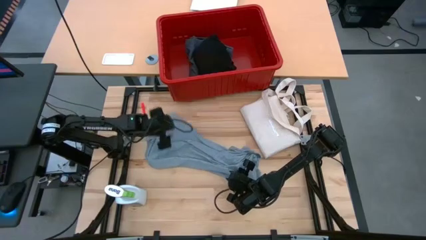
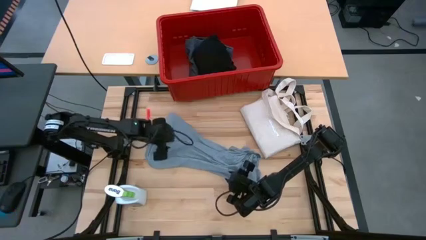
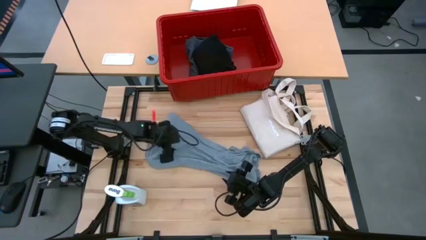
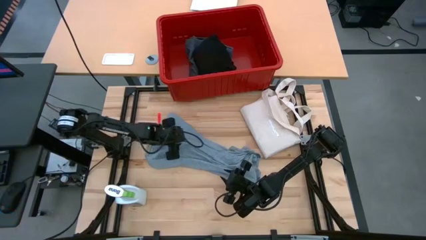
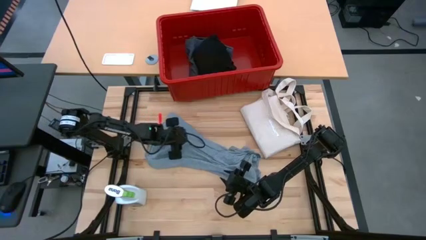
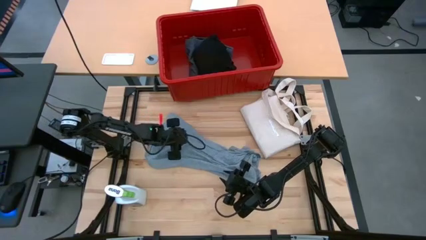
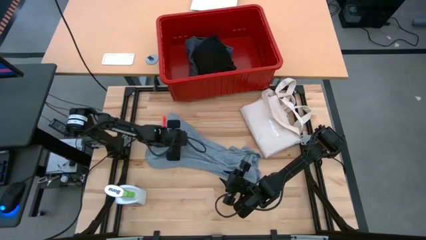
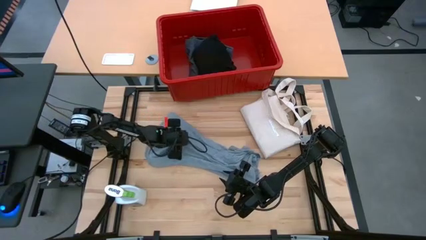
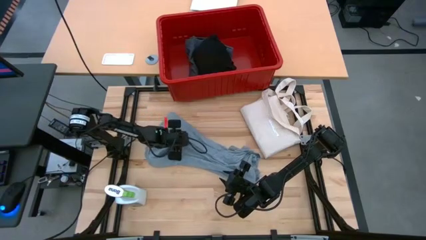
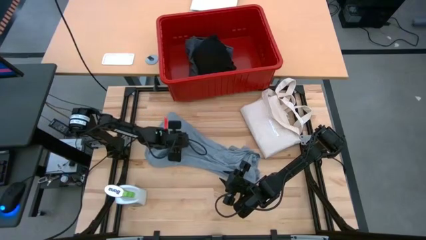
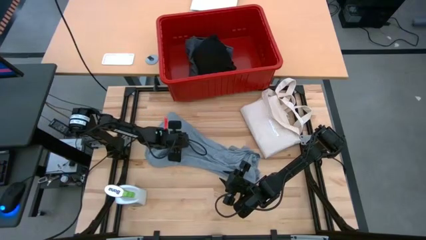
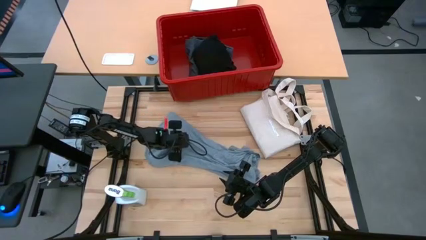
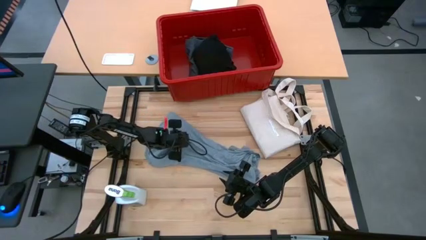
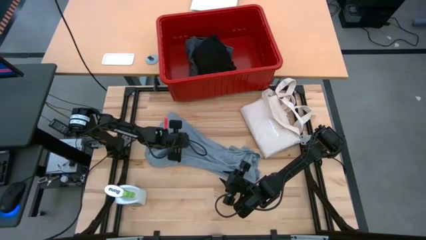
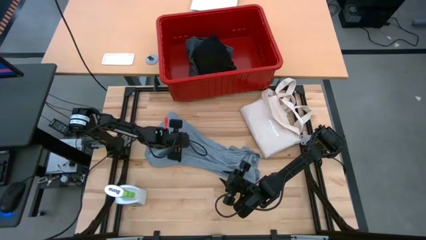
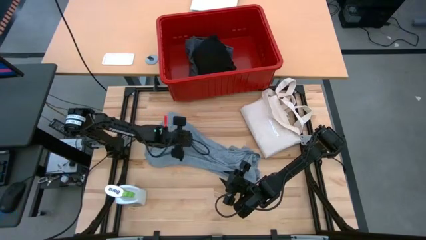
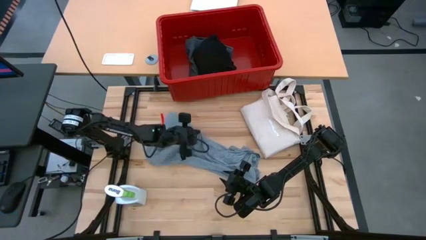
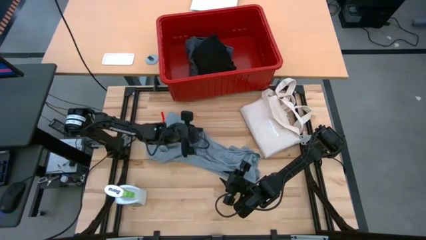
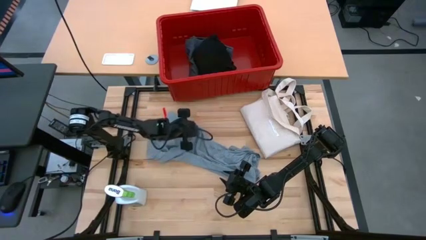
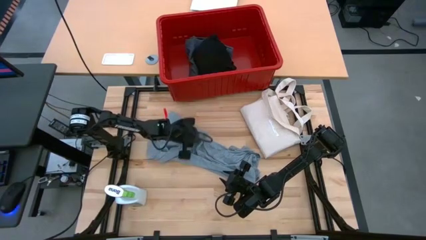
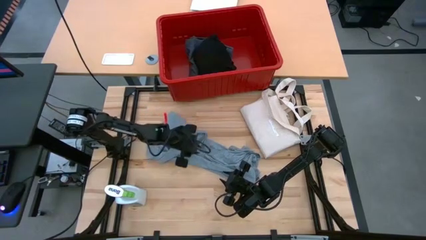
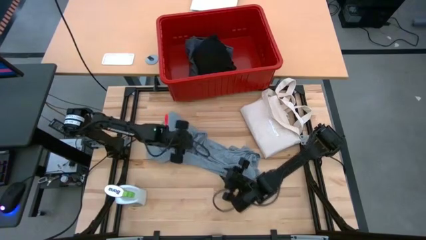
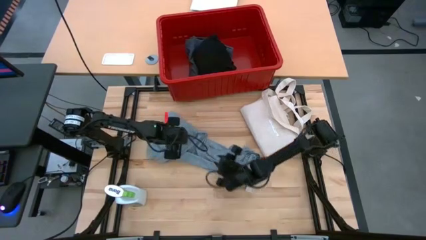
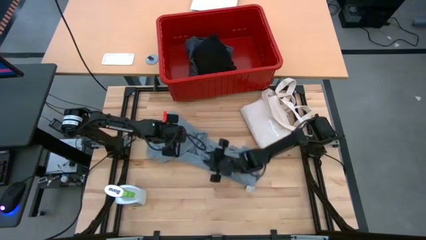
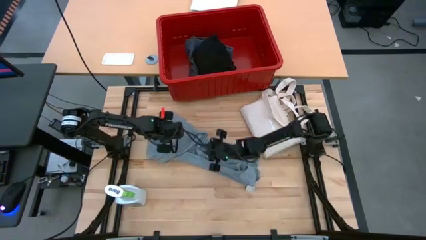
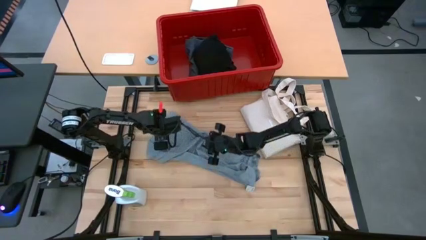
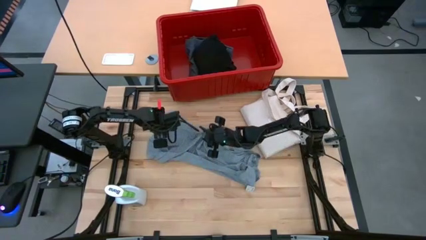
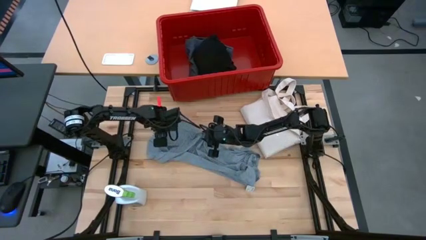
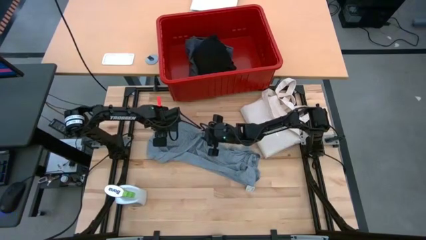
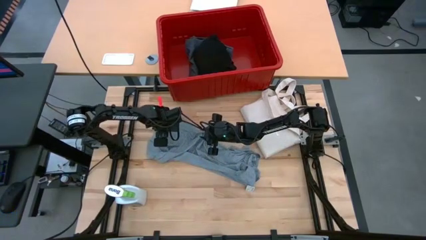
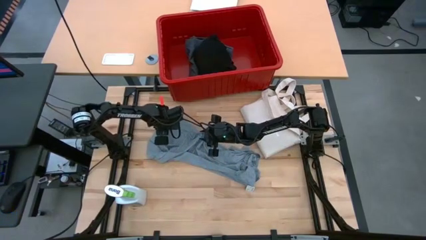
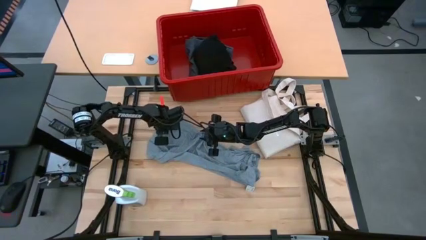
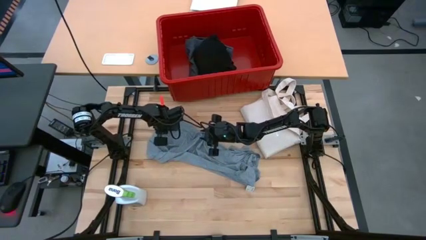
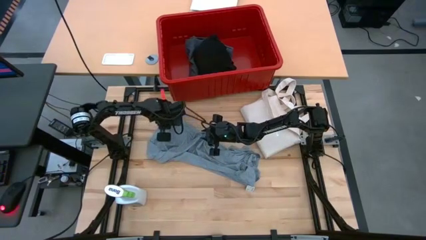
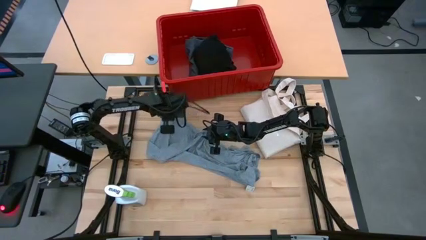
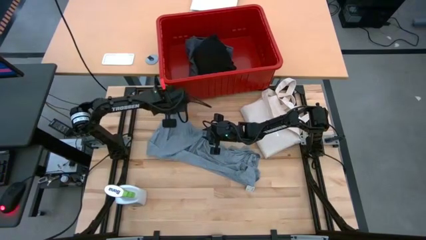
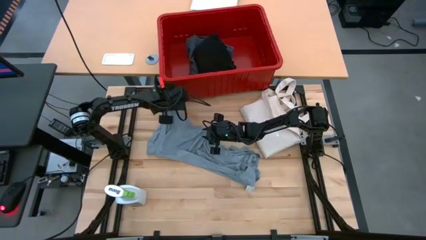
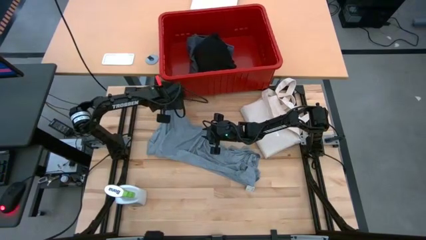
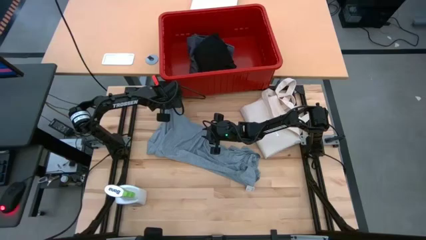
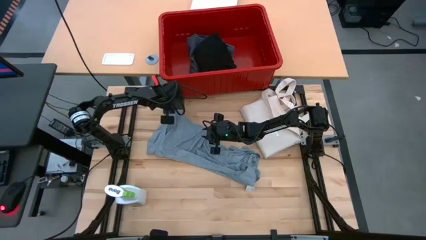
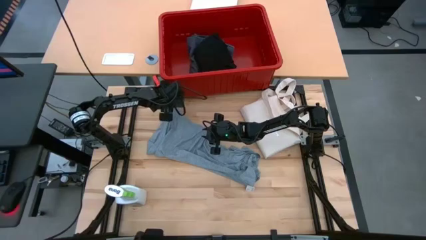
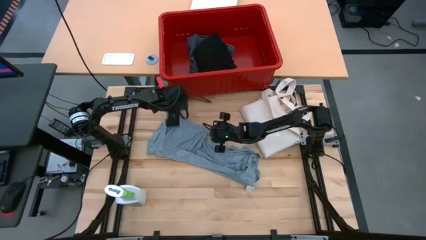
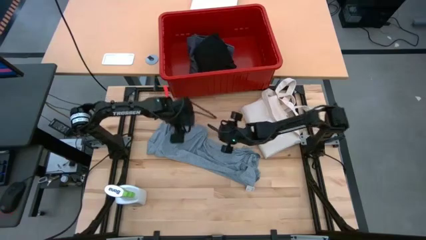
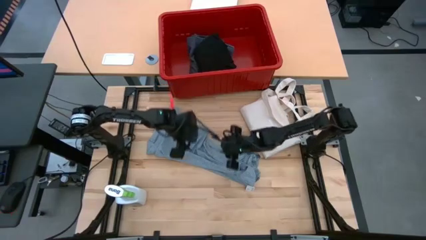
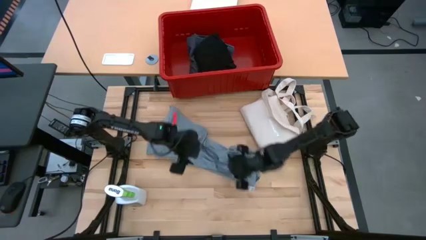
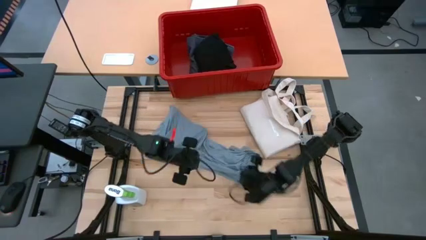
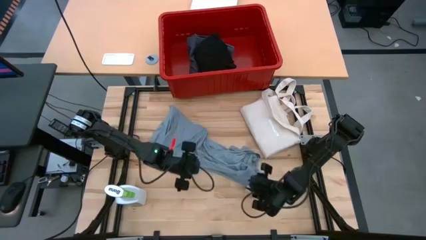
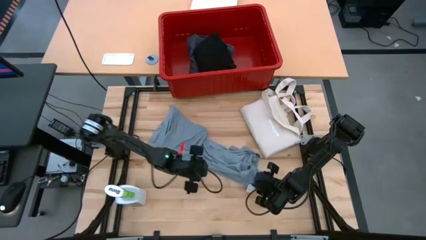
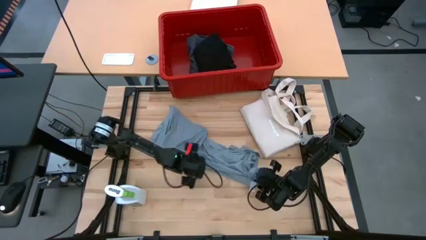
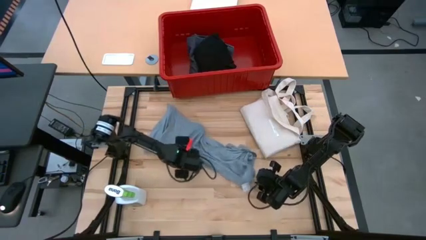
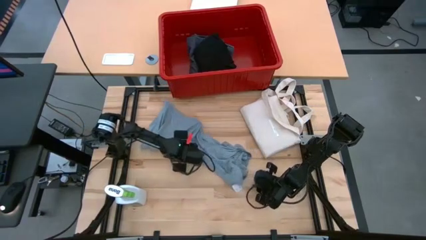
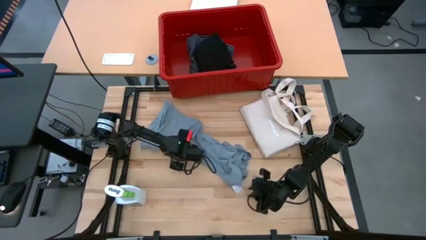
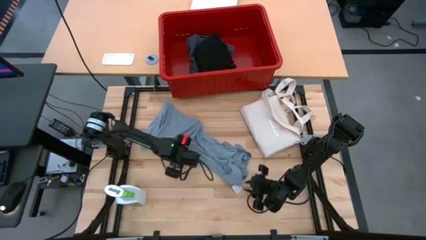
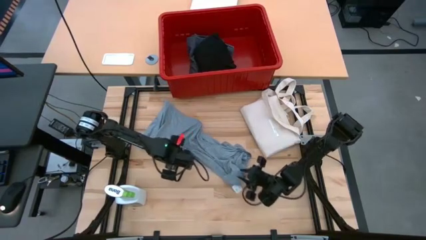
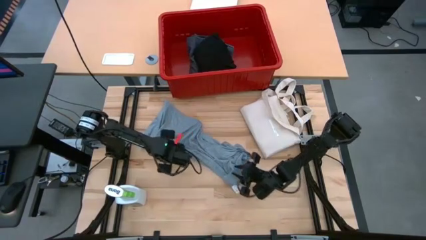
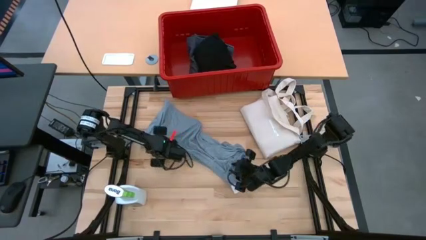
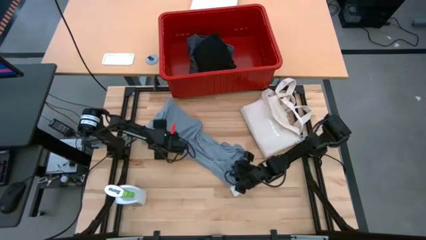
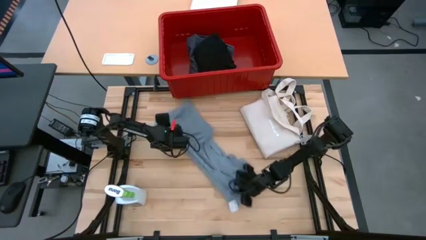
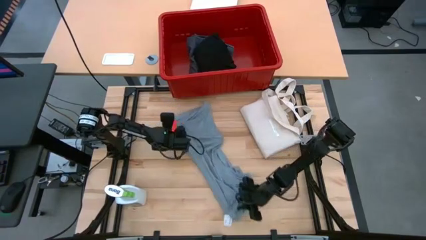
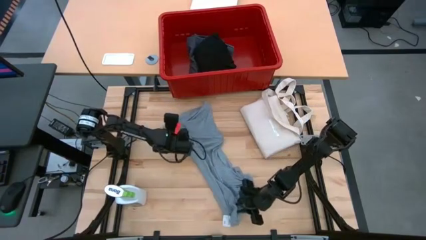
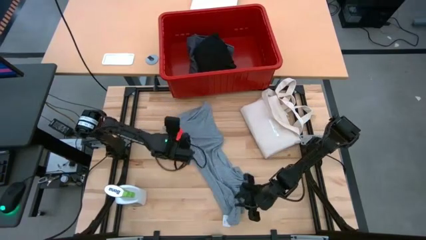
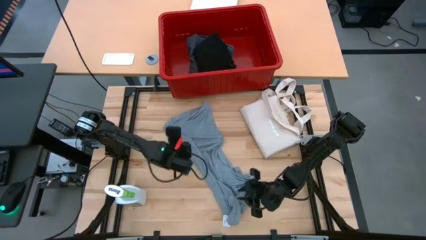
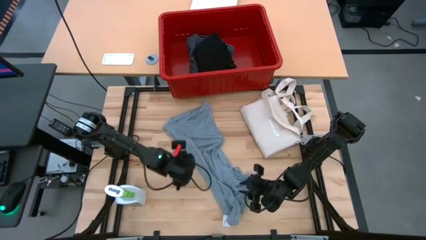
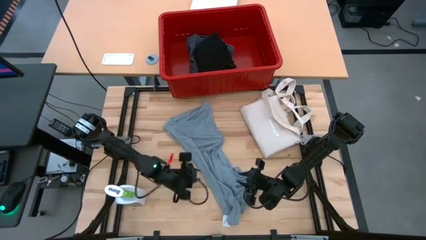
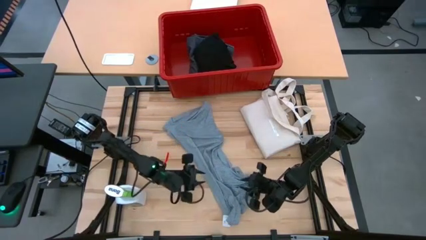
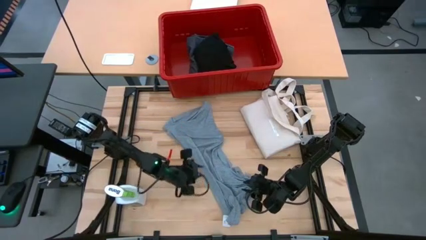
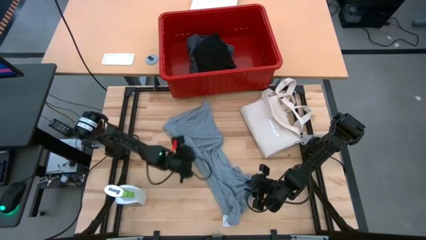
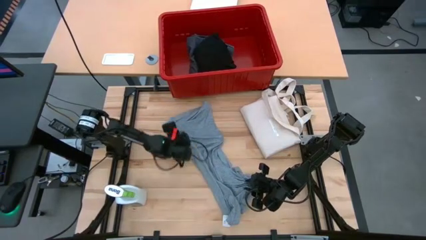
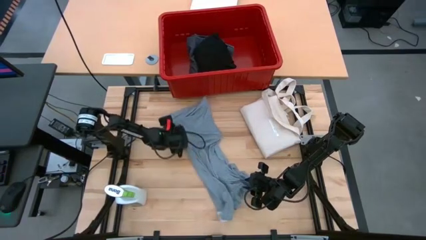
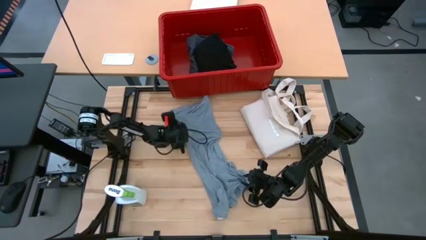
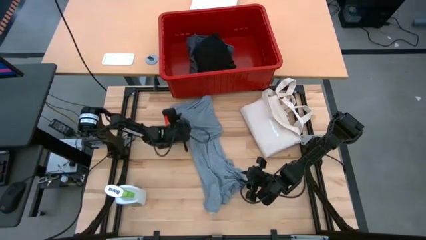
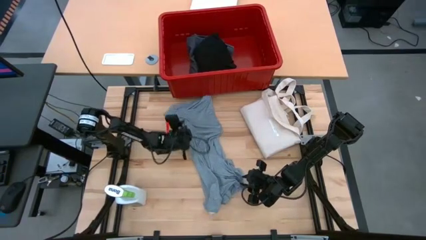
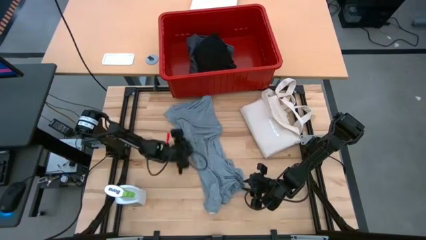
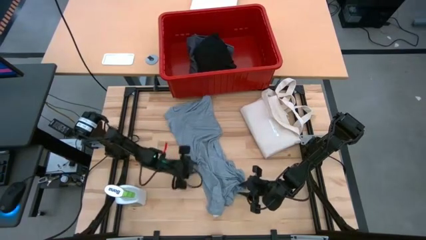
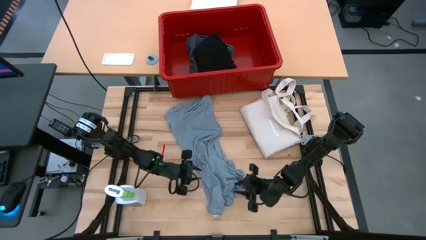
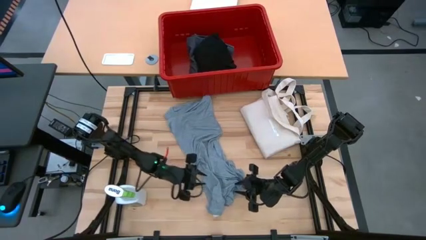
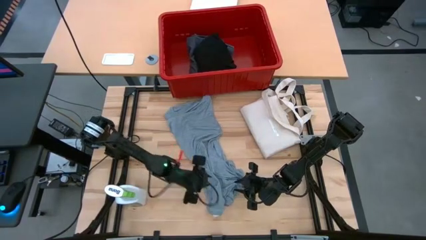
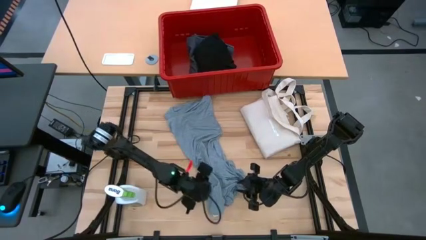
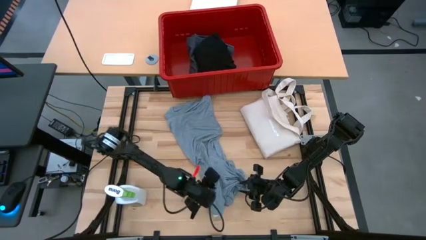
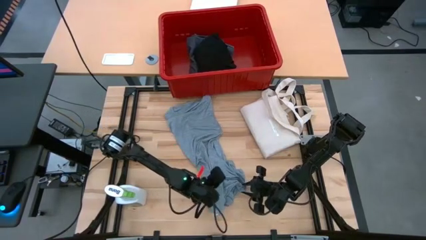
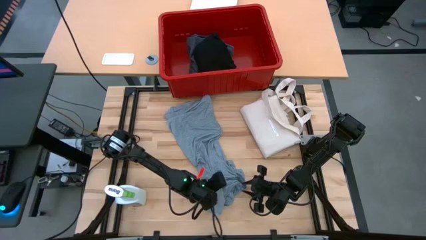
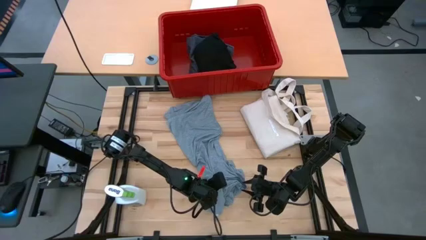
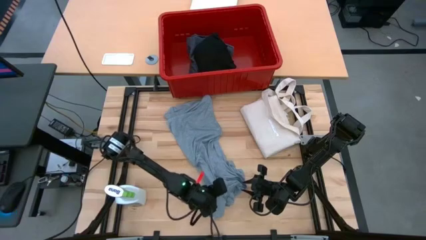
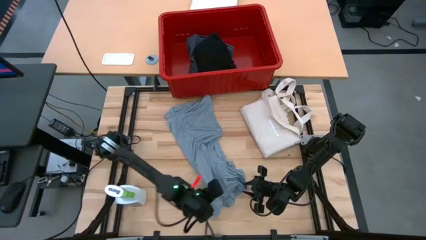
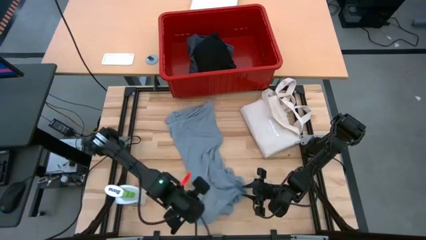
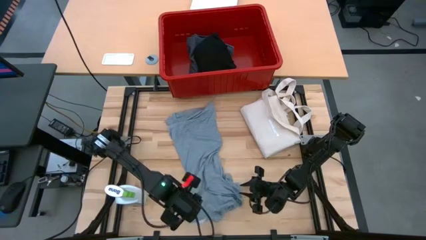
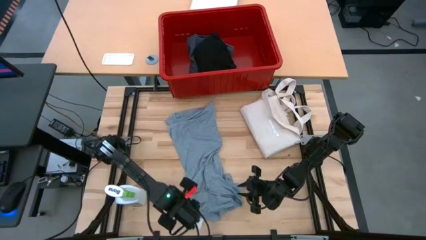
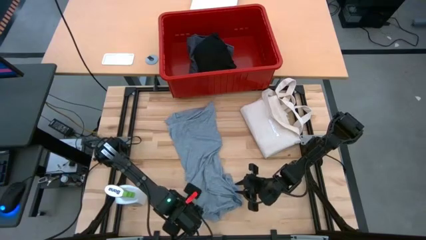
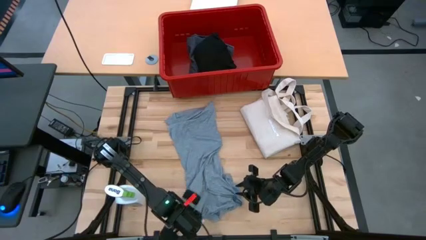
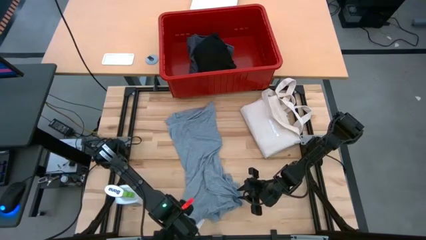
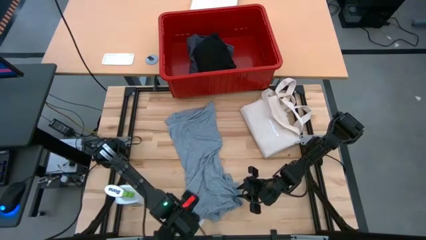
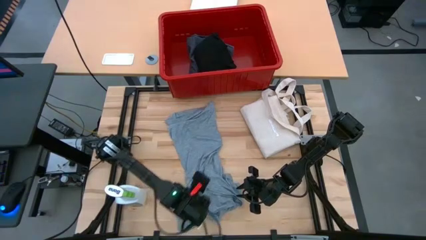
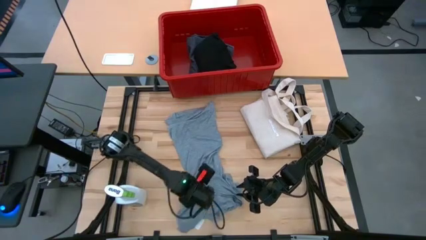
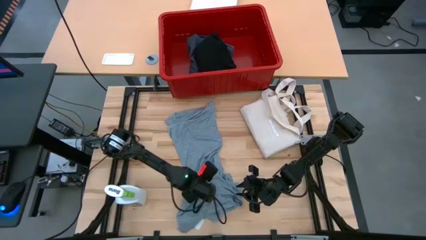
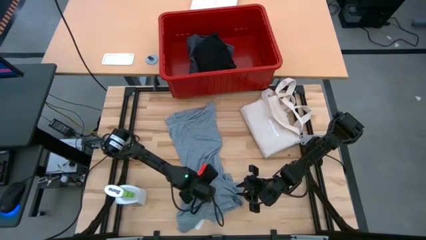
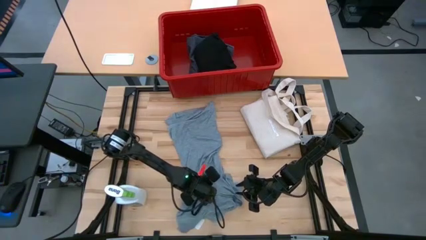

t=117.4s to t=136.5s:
Task: Fold Laundry from Bin
Fold the gray shirt
